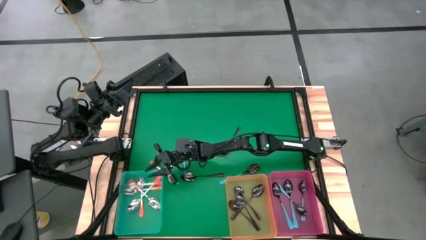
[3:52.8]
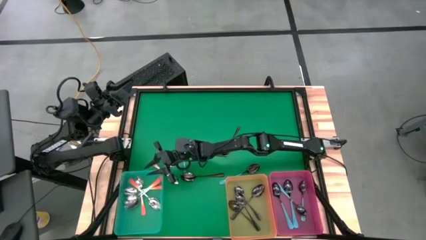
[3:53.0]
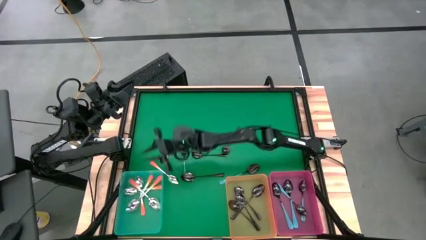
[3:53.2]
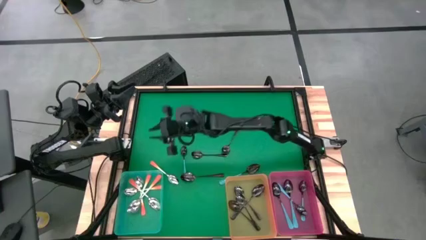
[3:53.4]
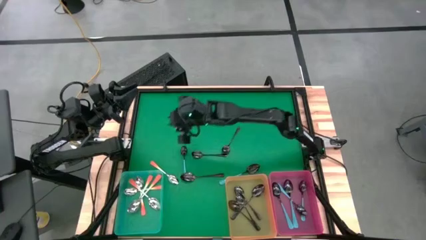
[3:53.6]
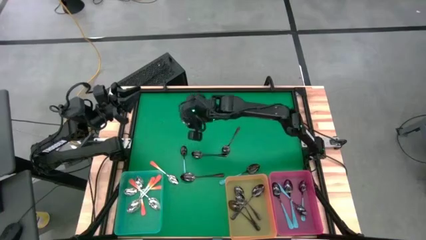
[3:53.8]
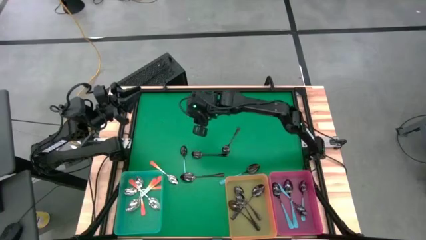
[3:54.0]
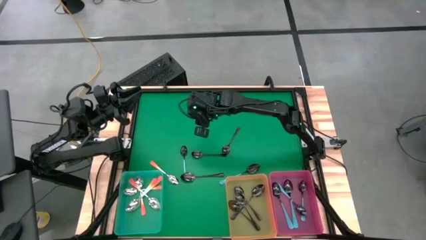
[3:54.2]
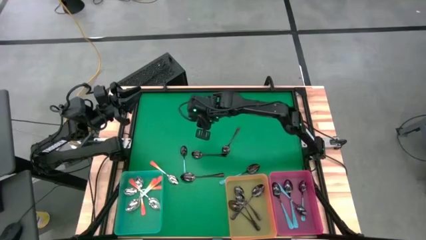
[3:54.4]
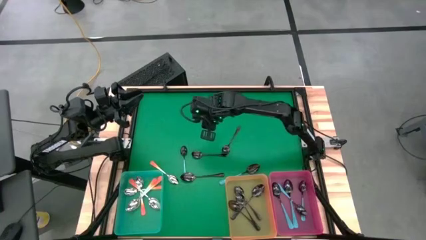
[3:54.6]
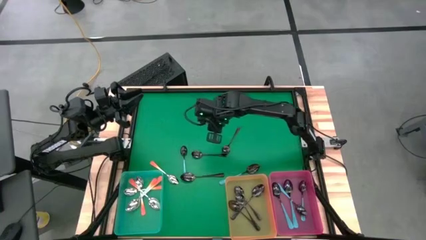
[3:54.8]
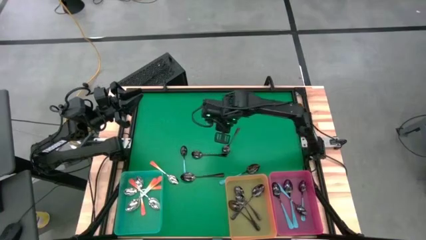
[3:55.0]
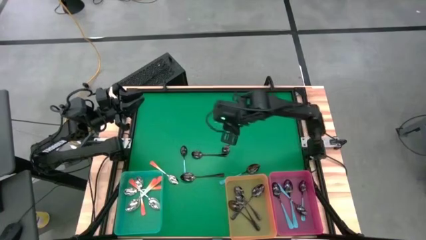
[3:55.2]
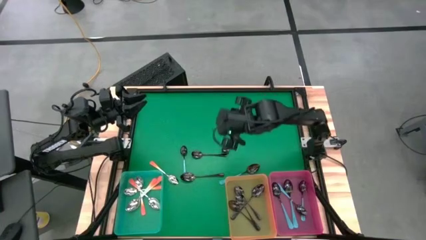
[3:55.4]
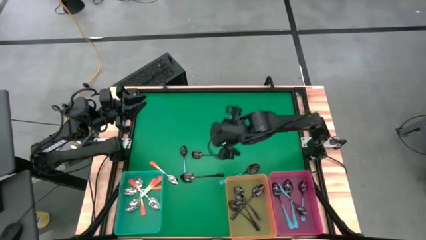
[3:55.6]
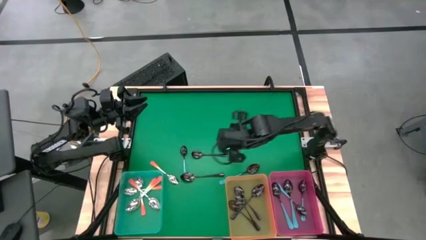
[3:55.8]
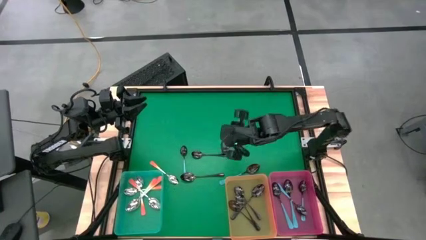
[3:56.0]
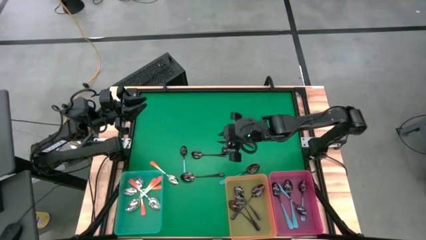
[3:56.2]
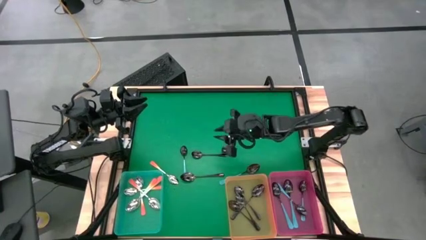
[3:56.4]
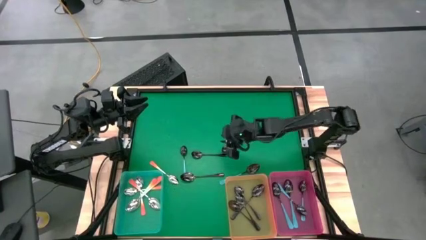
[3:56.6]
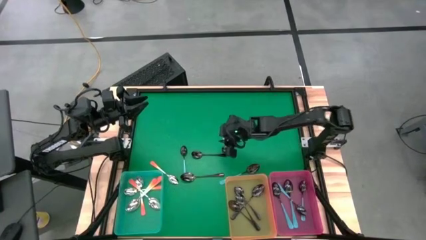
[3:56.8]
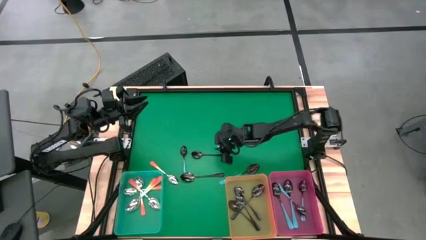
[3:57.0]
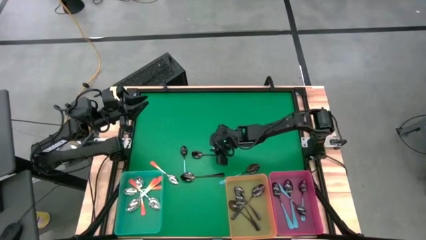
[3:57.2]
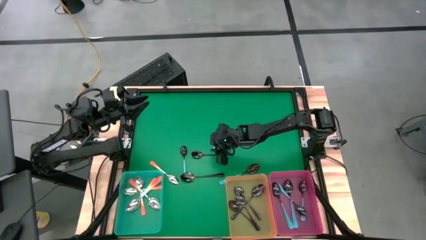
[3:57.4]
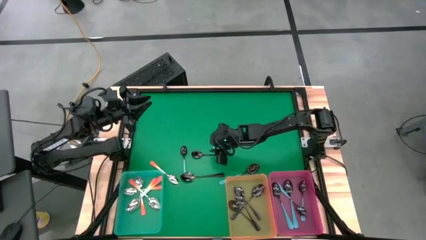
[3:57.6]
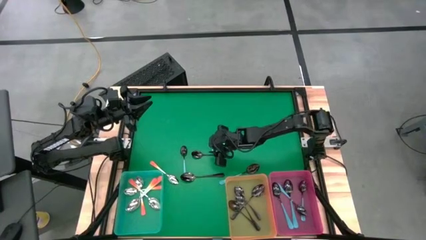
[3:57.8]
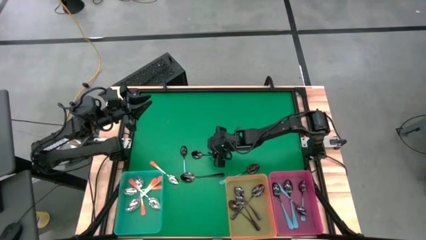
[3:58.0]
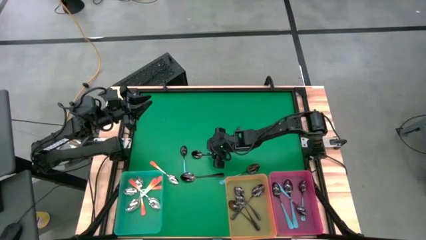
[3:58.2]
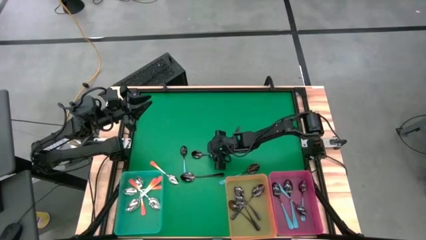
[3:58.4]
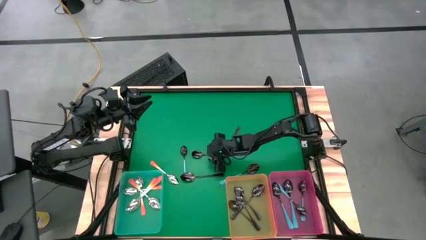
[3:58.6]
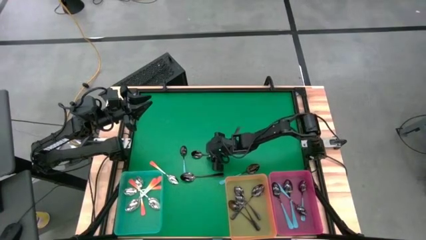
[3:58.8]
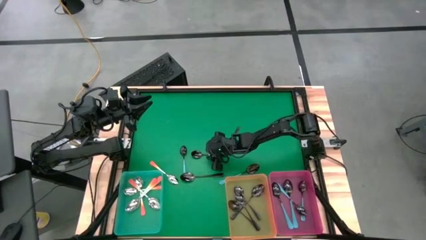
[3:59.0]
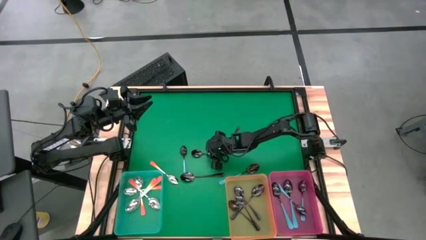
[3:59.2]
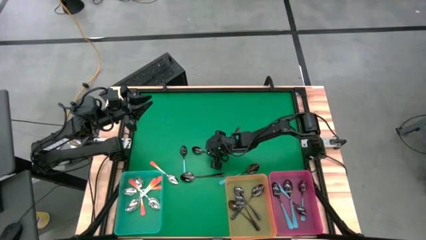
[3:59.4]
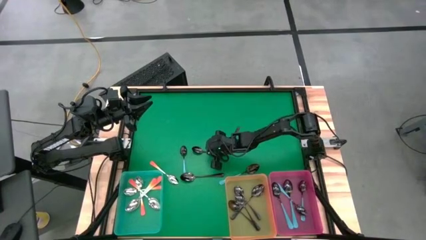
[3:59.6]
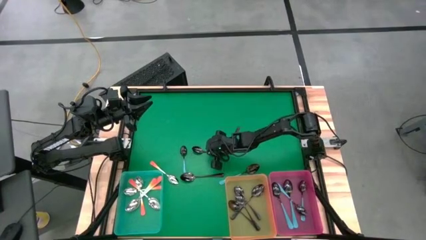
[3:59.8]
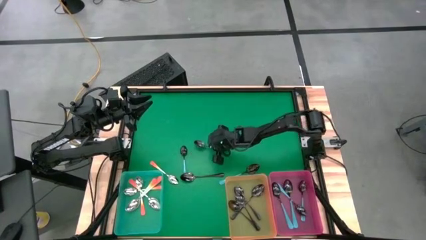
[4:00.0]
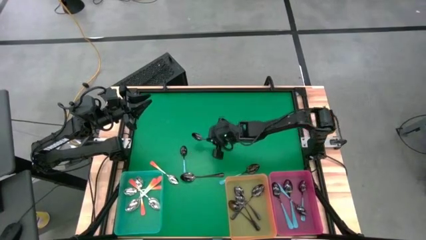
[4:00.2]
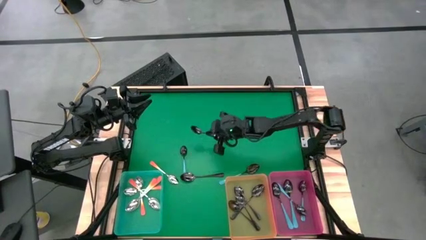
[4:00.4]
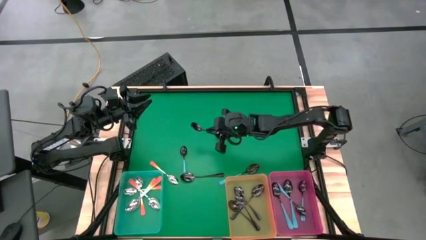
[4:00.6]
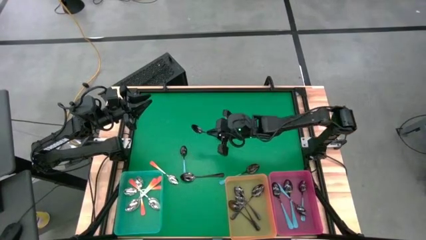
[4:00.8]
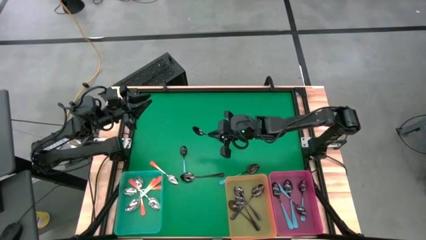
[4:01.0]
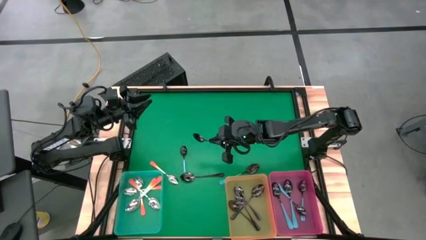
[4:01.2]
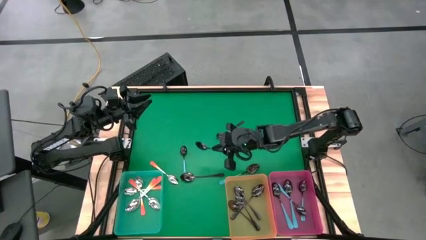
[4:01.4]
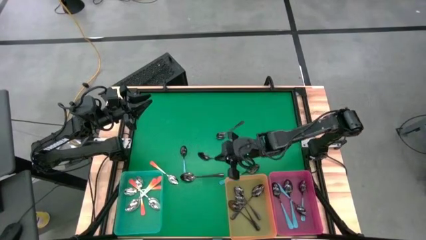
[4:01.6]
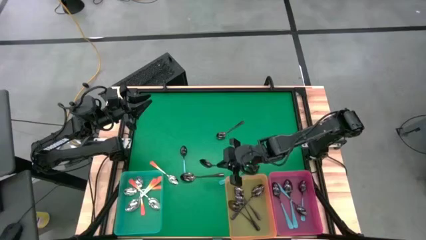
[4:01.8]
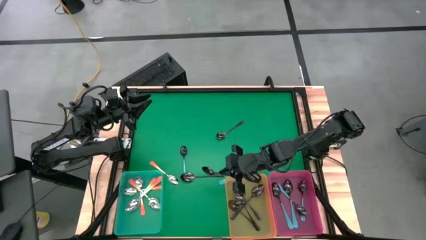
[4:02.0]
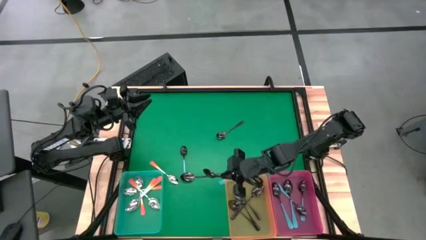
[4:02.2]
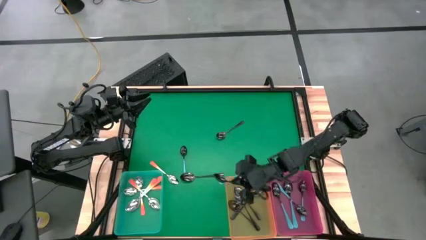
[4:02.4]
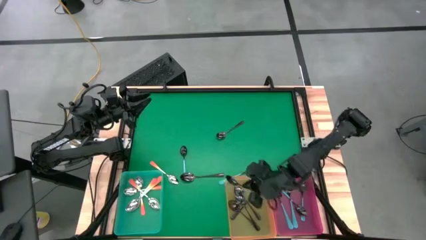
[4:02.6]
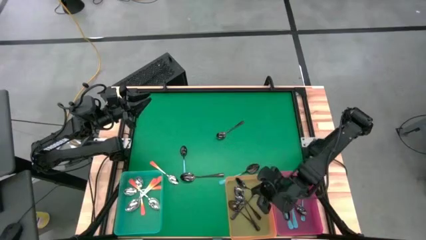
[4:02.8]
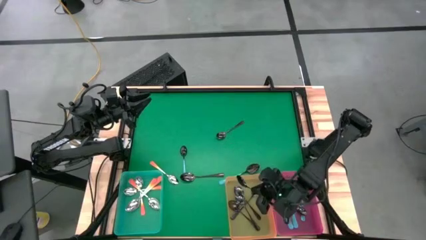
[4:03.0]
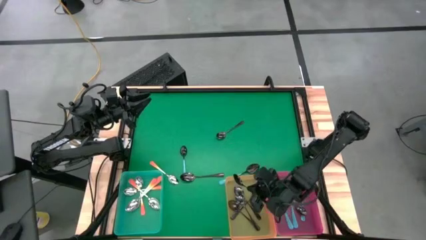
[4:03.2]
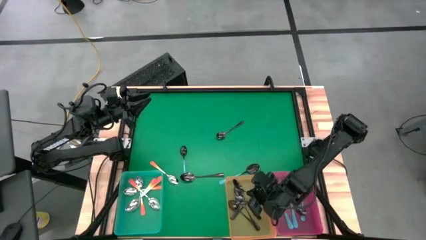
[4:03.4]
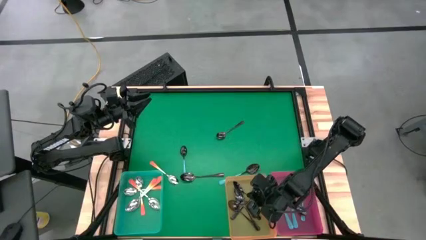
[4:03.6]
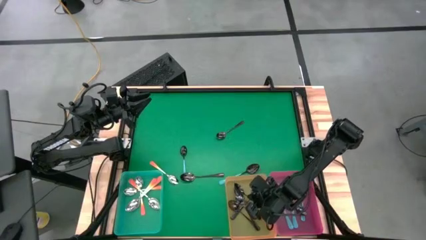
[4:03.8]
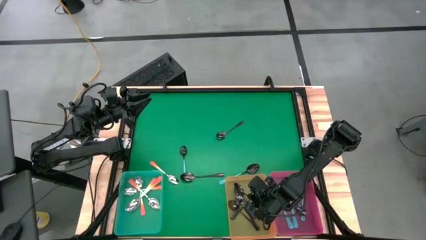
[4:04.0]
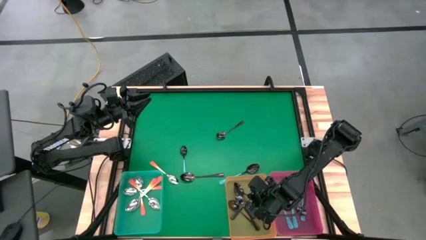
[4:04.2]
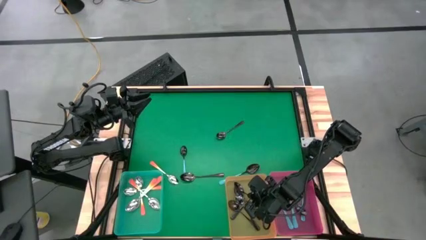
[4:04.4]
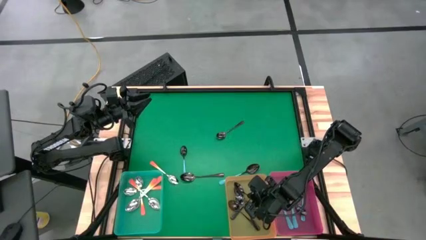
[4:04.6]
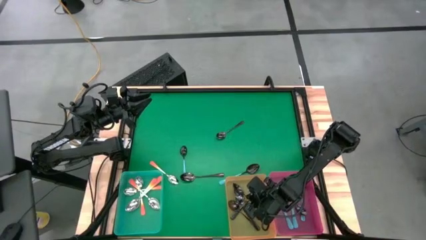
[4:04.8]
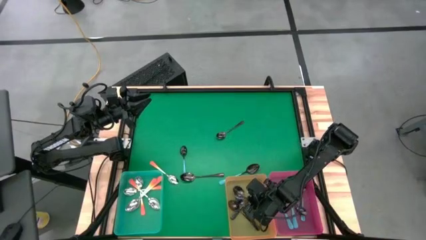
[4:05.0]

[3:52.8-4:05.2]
Task: Sort silverware by color (type)
Put the black spoon into the orange bin

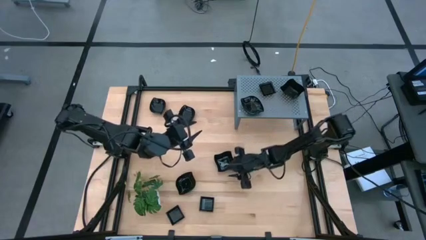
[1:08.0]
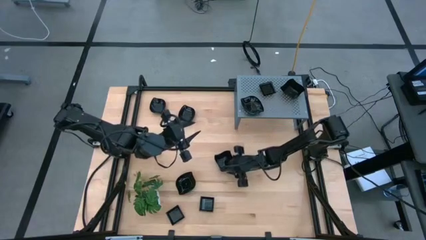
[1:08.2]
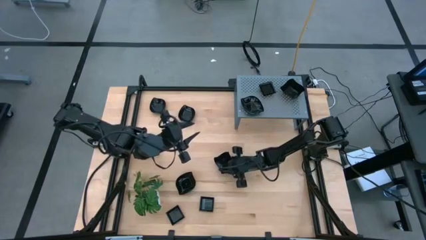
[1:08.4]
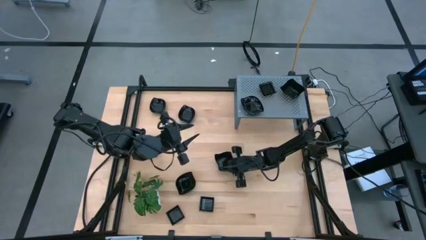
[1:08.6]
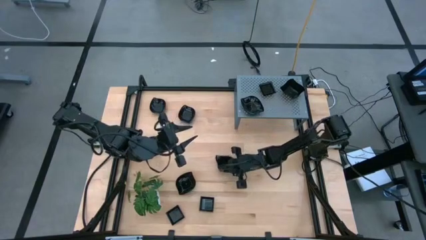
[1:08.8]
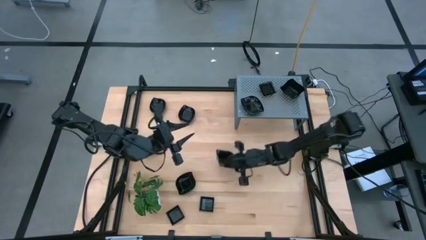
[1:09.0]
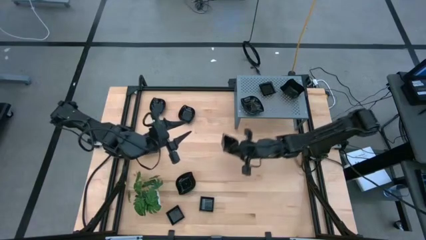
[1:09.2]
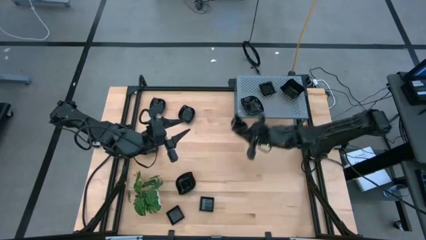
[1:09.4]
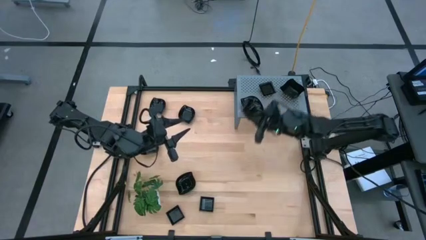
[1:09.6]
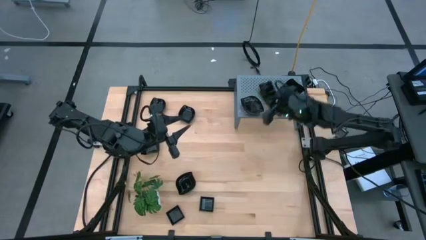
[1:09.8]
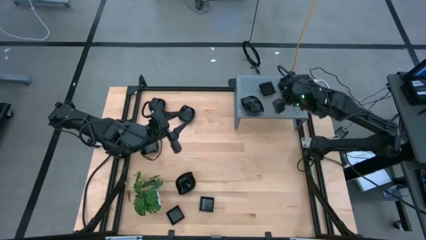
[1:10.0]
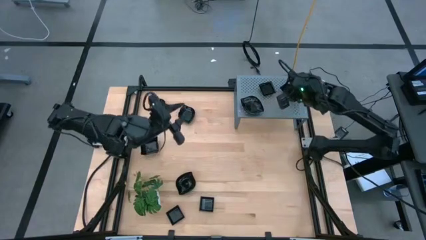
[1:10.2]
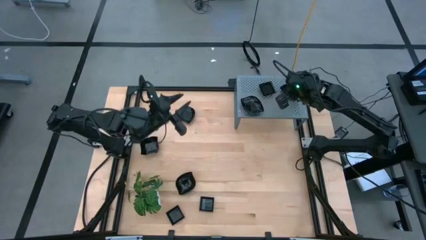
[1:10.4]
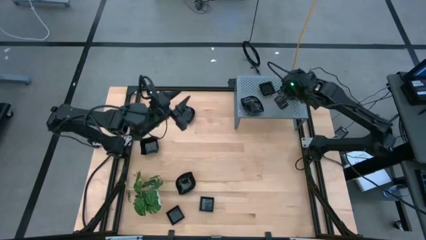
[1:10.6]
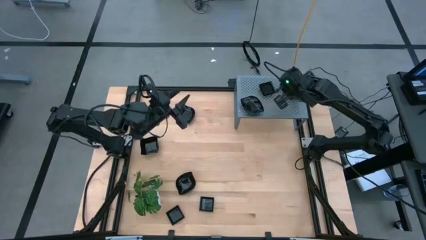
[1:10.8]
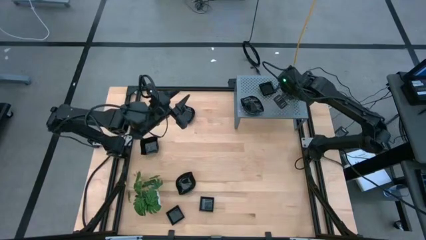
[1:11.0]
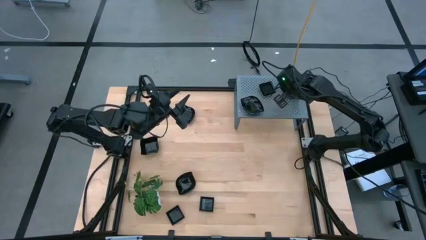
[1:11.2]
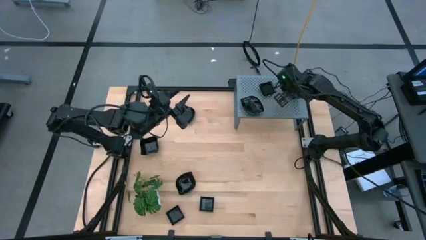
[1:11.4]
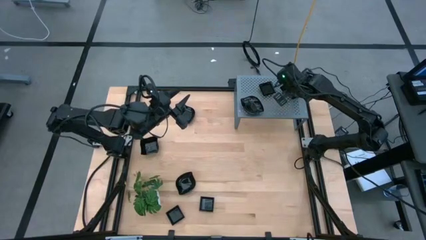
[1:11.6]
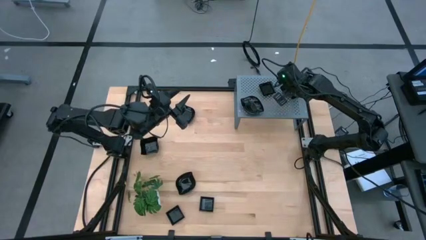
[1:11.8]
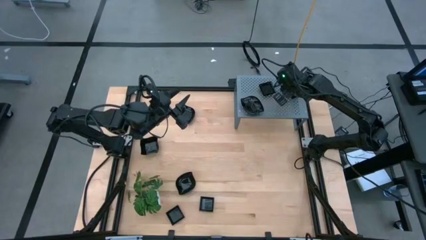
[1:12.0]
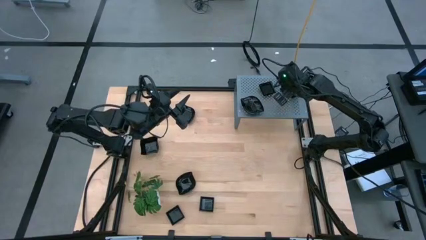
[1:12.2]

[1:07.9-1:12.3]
Task: Pick & Place Mini shaped plates
Stack the distorted square plate on top of the other distorted square plates
